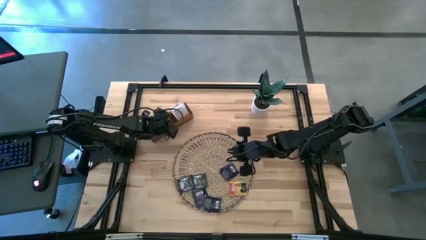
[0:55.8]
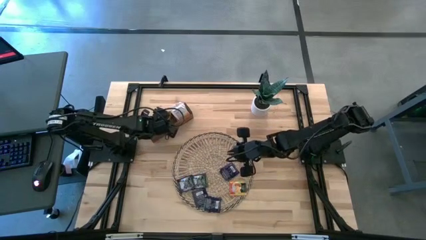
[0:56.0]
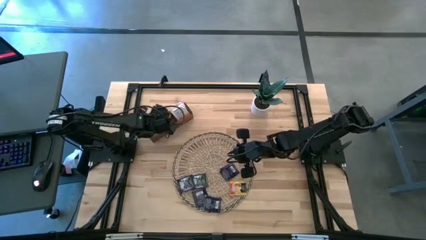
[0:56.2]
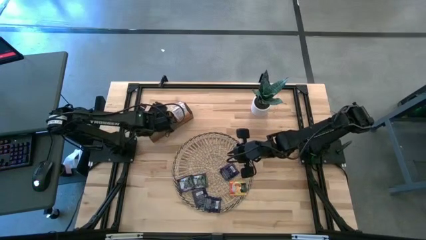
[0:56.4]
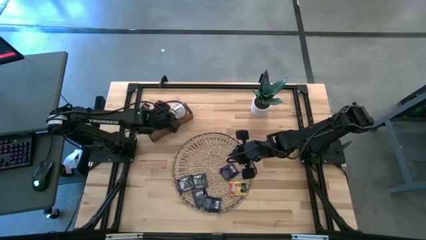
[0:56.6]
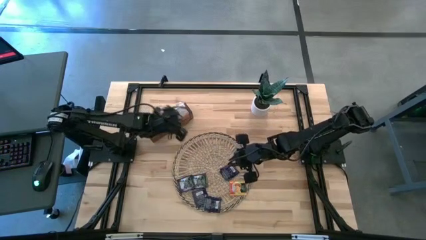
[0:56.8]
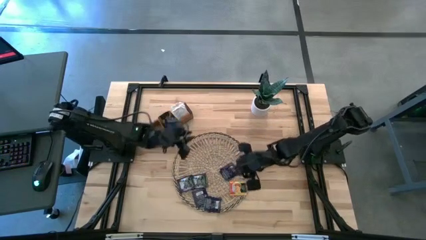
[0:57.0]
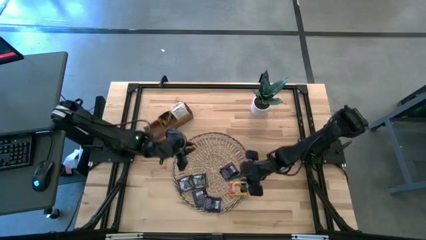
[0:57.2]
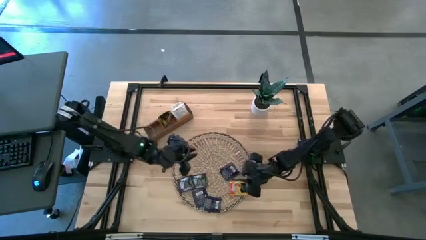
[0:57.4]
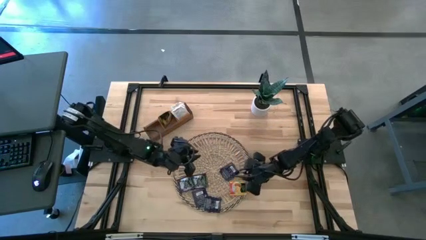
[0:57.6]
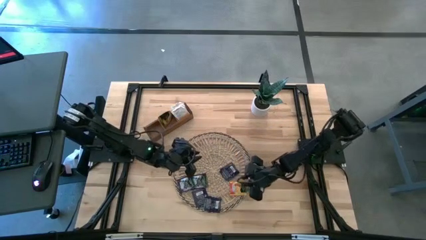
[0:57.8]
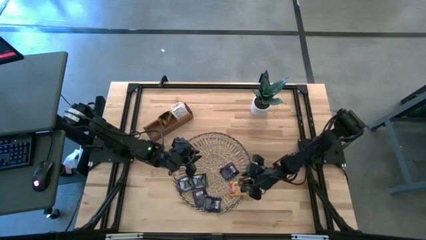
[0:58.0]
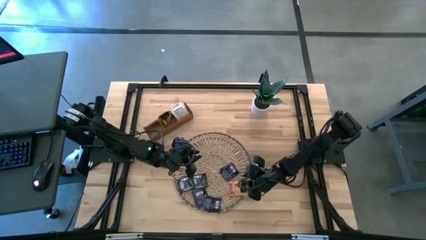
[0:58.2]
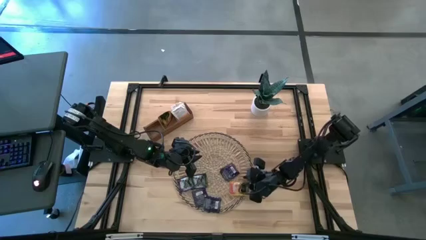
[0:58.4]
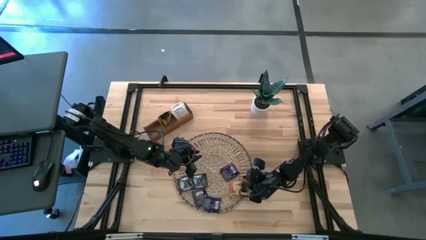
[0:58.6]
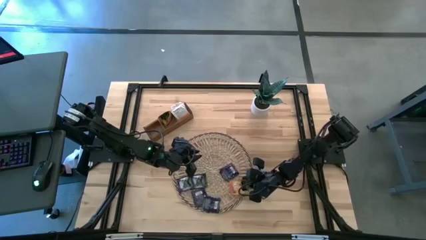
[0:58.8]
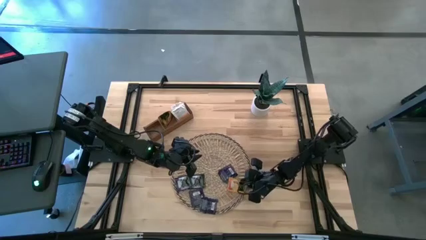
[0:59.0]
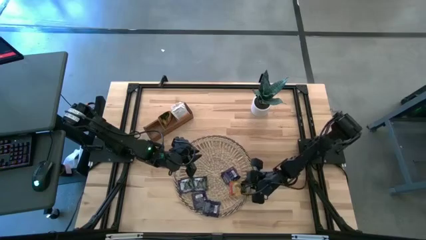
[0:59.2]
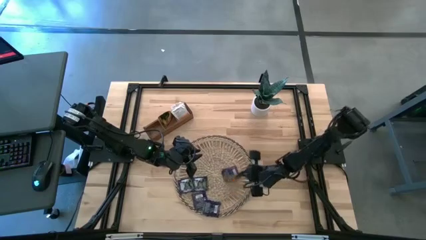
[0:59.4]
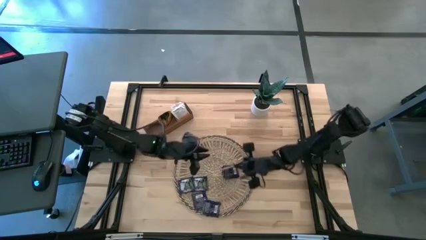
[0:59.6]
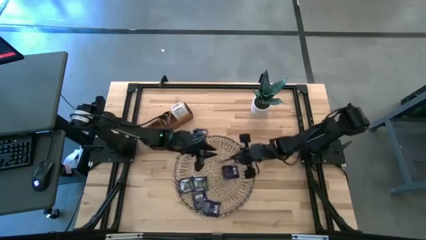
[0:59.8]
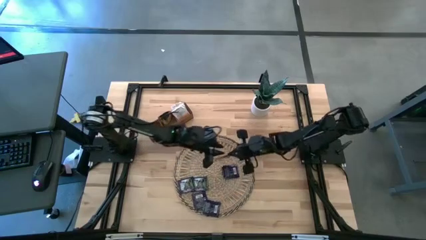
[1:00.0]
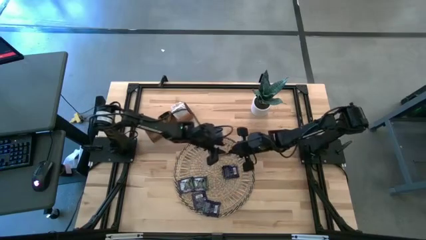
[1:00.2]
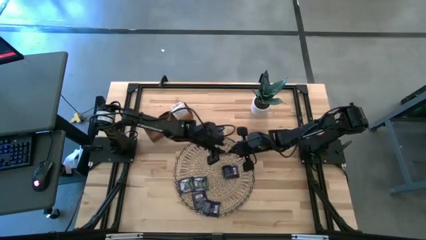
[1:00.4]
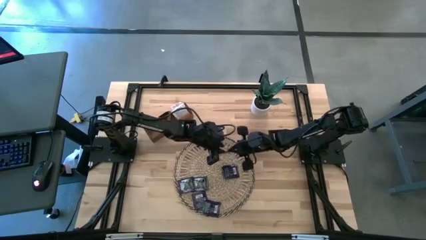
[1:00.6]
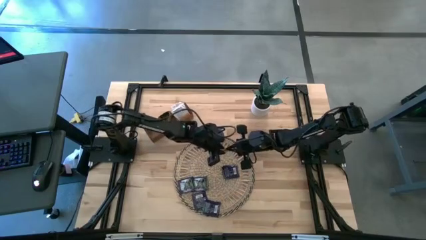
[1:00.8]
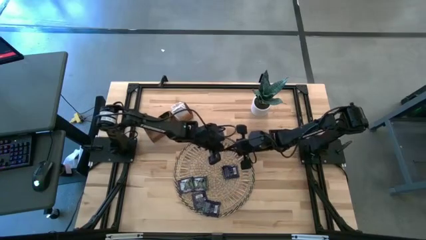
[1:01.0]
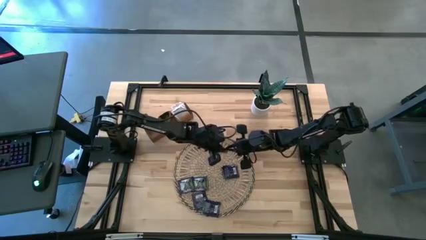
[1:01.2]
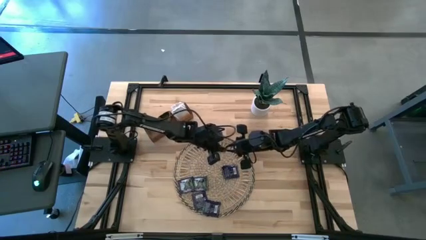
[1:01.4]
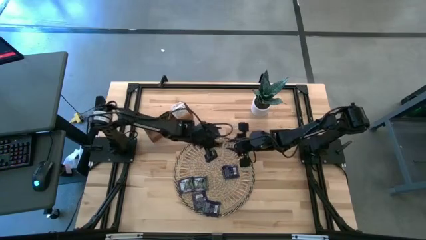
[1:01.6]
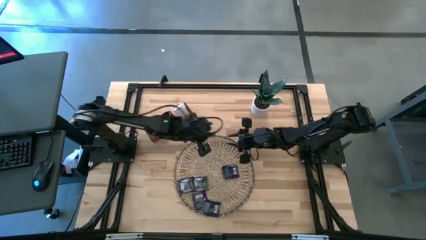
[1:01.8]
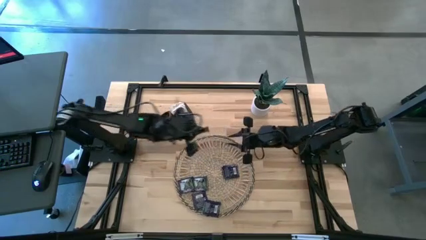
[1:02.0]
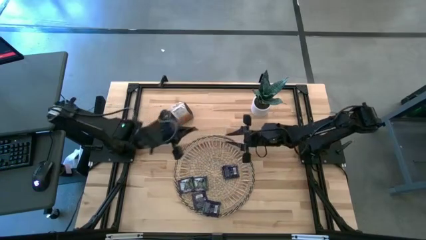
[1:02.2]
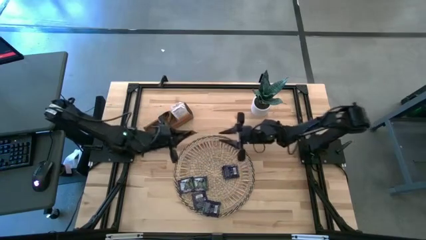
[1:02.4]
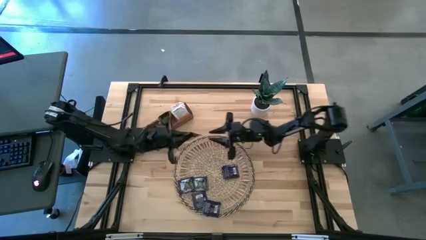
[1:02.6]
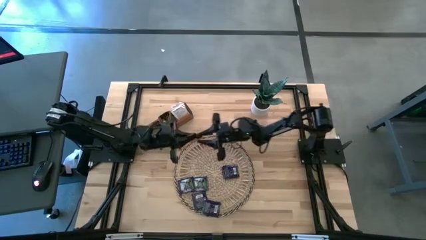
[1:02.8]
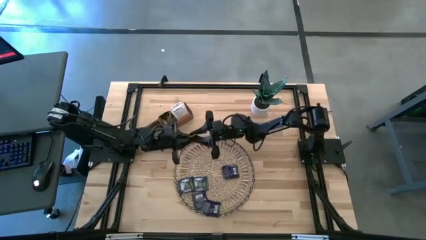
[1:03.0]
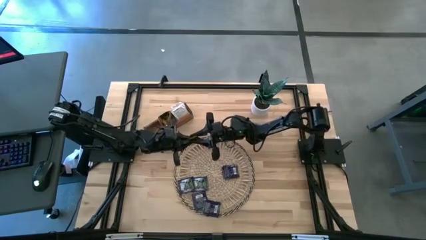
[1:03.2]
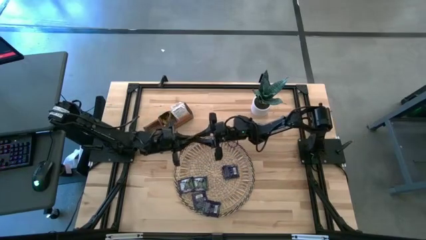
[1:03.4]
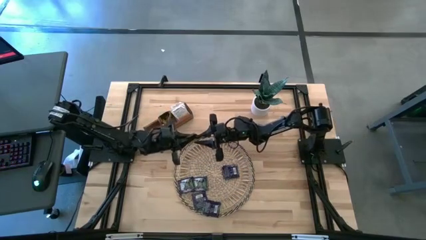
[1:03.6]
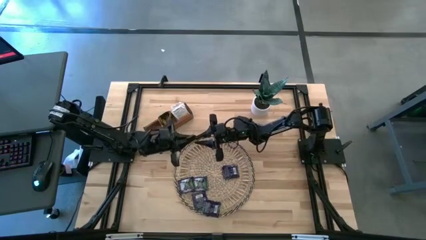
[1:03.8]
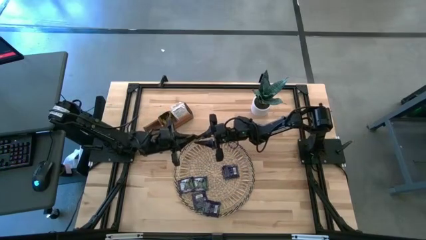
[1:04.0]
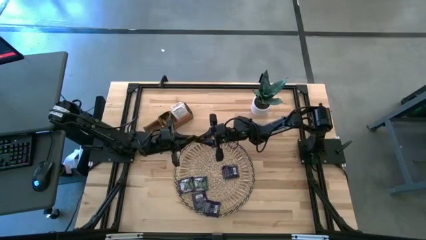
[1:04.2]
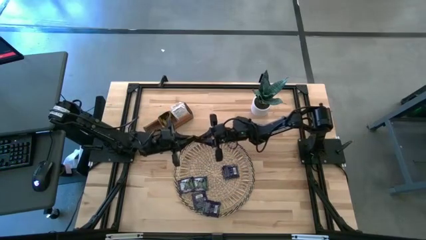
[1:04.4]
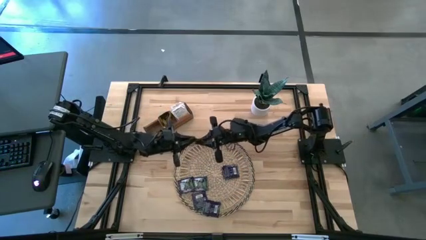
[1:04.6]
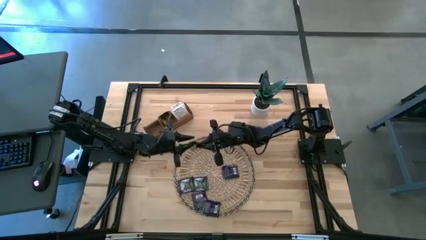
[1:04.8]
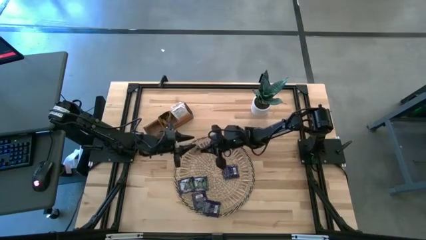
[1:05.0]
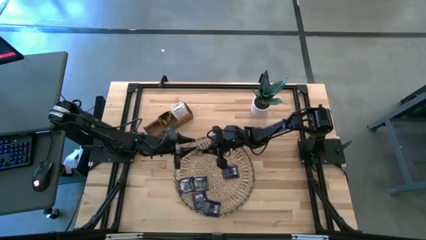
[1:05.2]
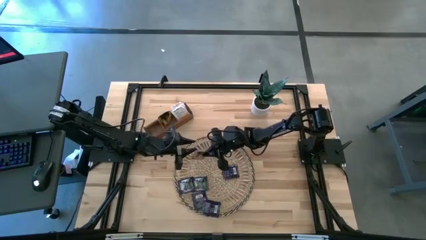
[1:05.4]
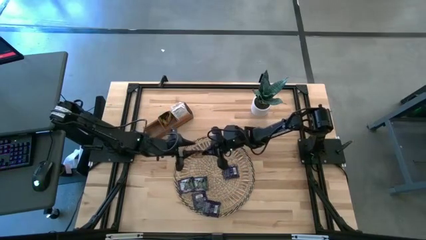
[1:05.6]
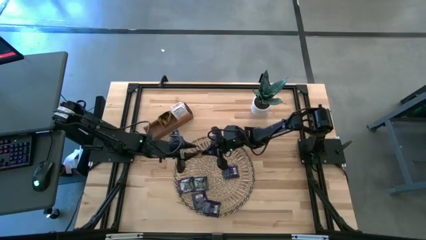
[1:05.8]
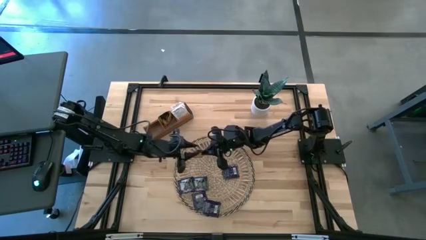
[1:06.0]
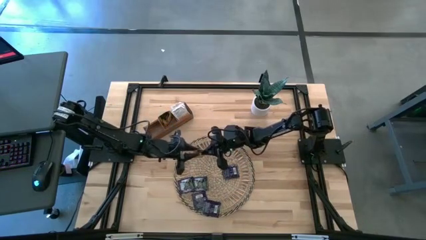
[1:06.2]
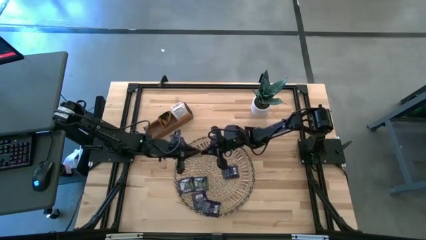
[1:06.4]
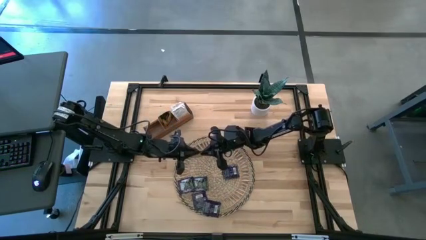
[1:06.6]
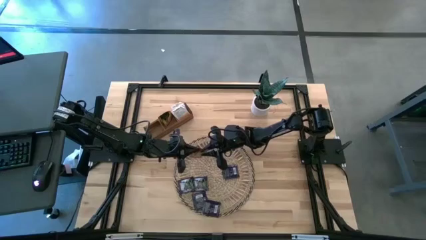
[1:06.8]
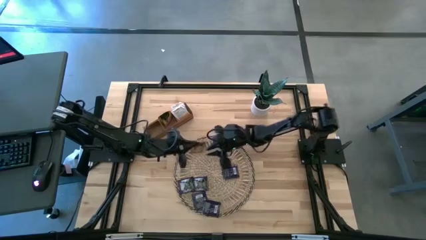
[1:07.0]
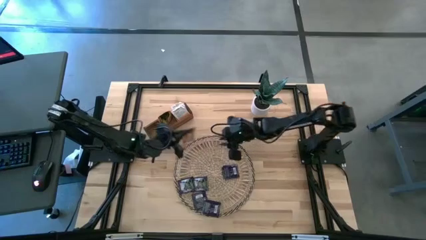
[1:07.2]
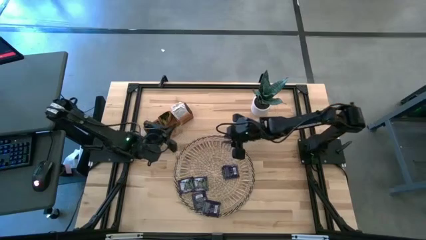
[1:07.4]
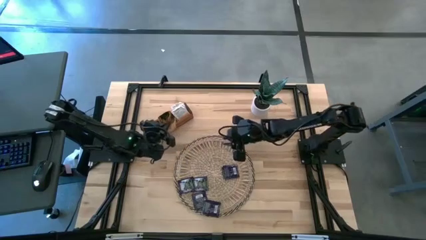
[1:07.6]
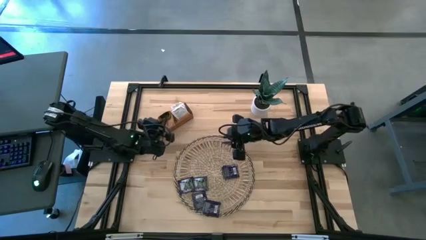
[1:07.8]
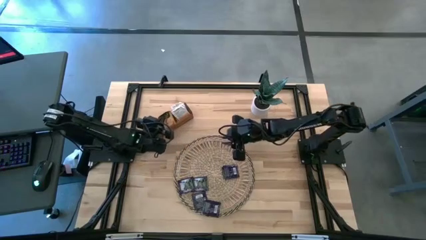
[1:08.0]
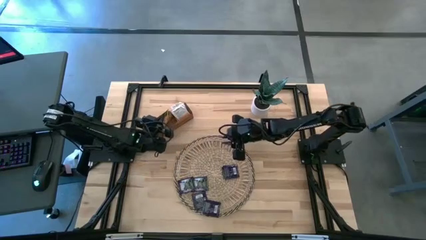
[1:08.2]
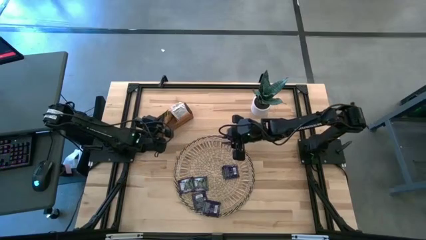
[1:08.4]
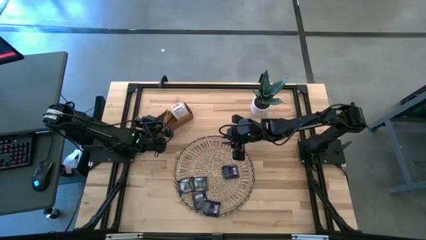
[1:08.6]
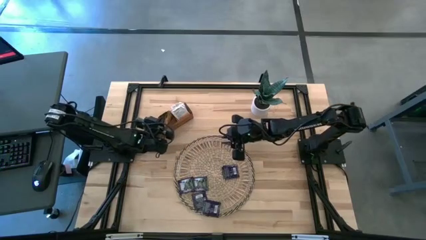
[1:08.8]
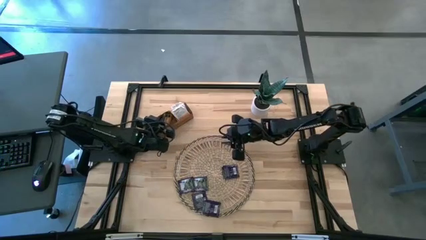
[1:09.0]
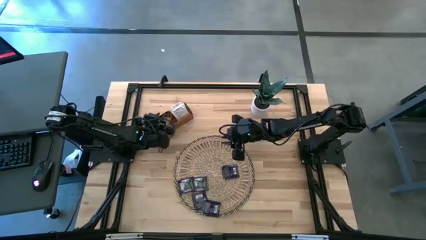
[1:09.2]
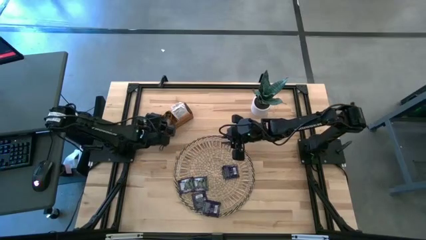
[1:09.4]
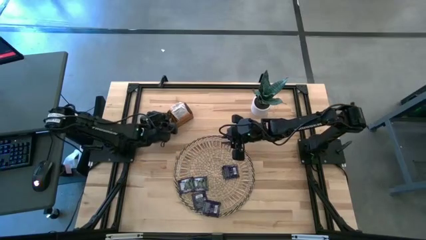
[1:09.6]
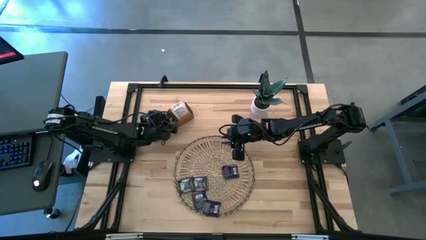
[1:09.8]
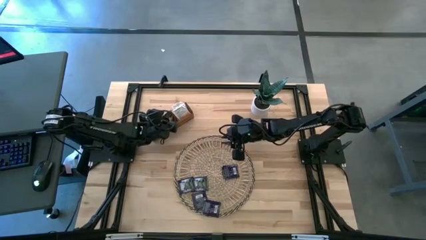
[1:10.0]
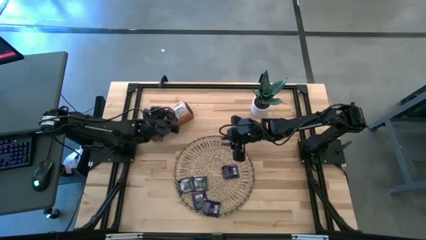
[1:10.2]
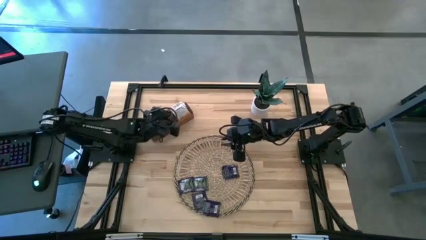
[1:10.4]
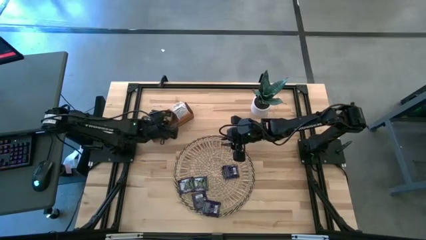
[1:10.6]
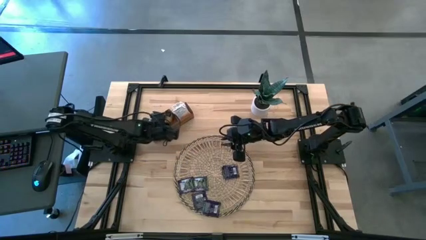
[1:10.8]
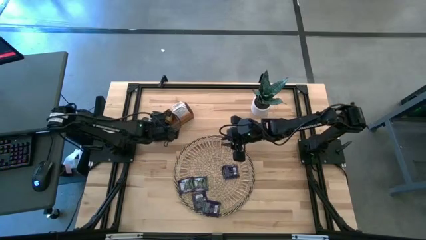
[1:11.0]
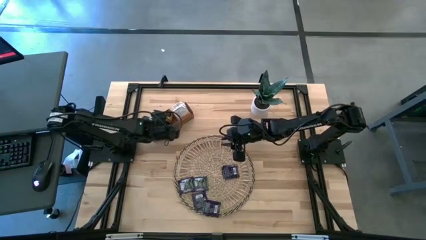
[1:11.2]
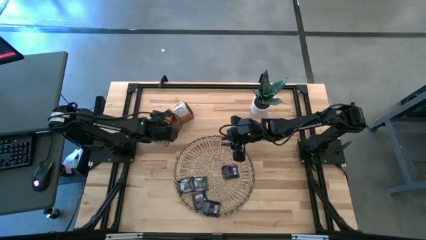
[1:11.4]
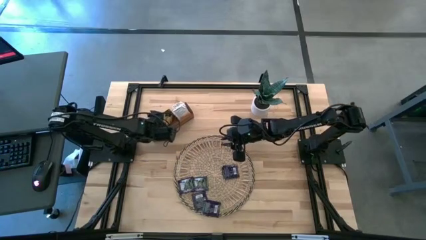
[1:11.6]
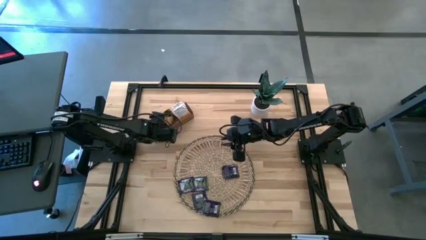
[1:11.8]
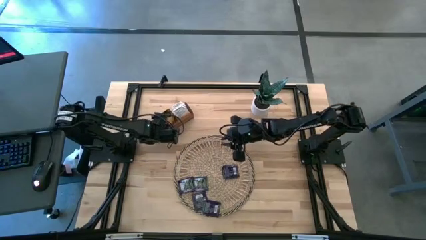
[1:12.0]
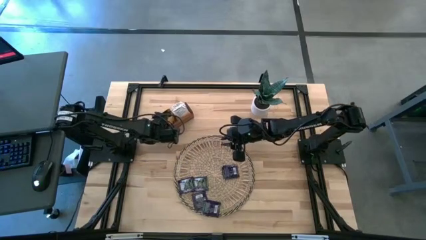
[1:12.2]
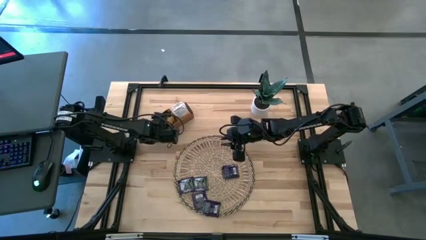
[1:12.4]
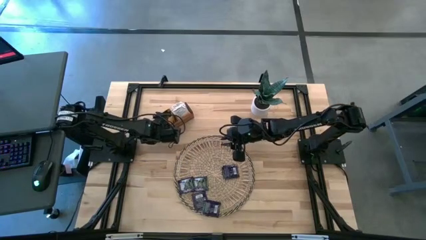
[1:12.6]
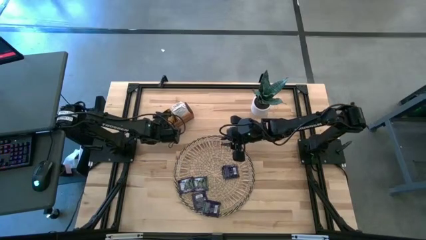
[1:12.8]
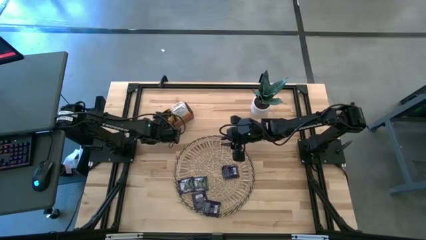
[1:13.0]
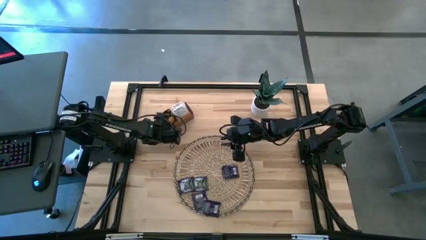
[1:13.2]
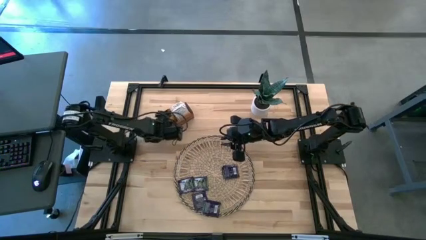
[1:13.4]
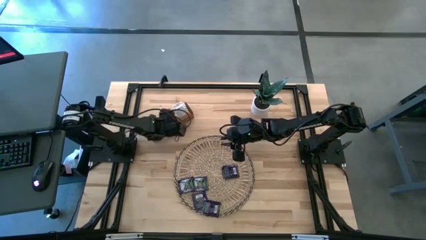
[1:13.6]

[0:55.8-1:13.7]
Task: Pick & Place Tea
Put the orange tea bag into the middle compartment of the wooden organizer
